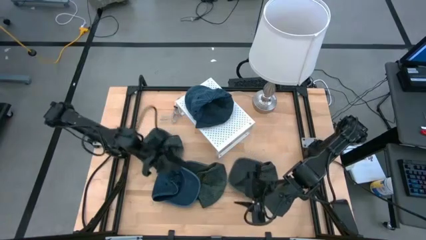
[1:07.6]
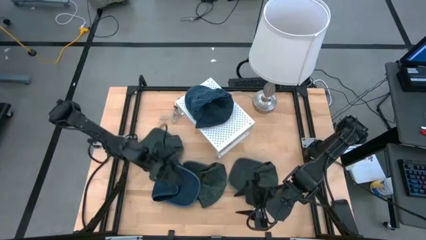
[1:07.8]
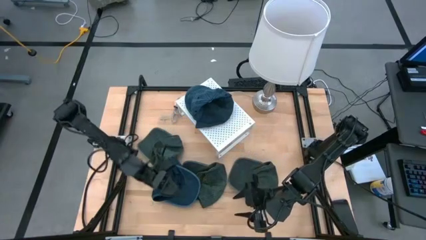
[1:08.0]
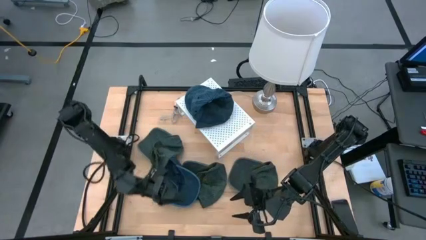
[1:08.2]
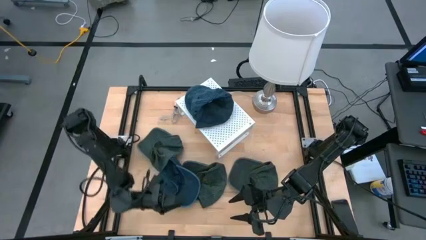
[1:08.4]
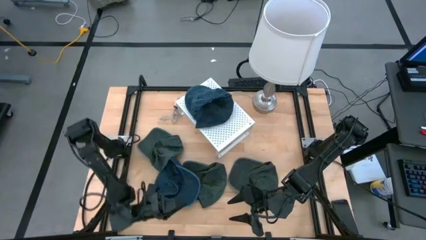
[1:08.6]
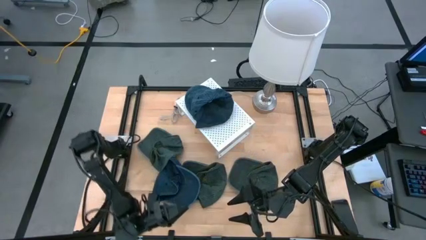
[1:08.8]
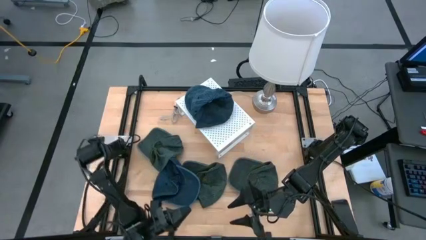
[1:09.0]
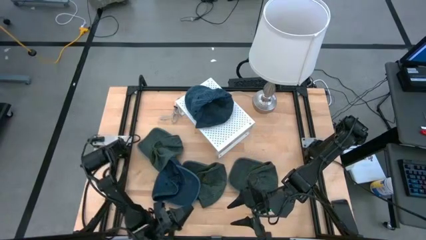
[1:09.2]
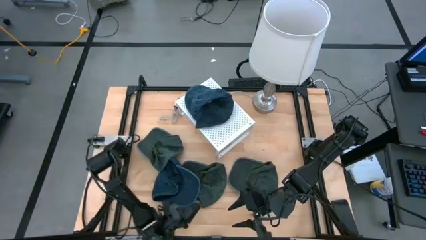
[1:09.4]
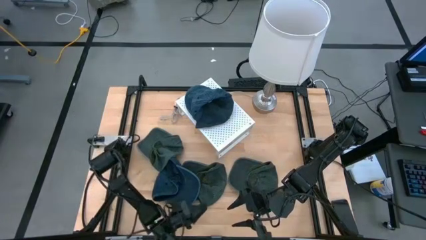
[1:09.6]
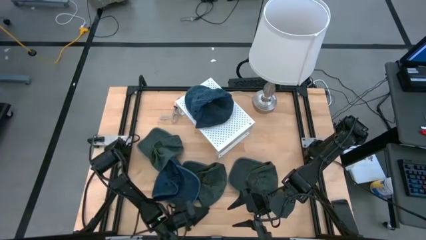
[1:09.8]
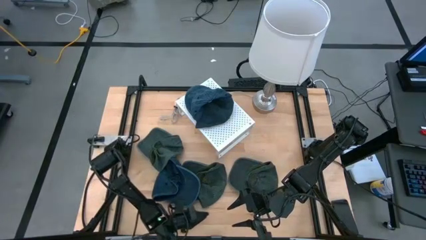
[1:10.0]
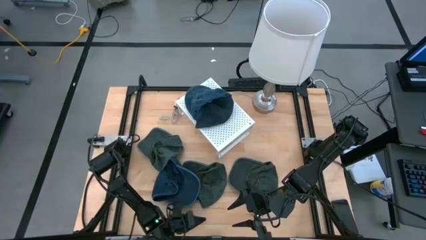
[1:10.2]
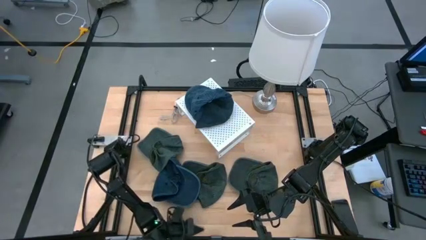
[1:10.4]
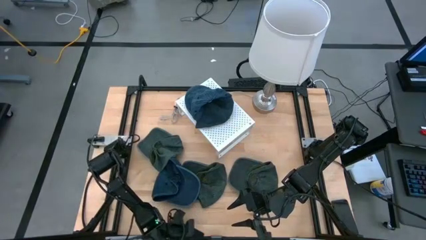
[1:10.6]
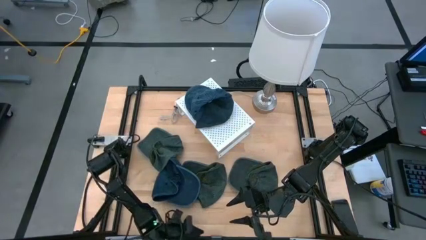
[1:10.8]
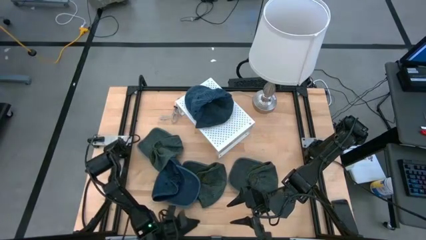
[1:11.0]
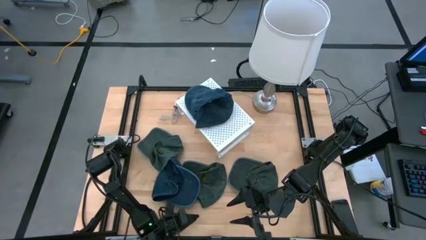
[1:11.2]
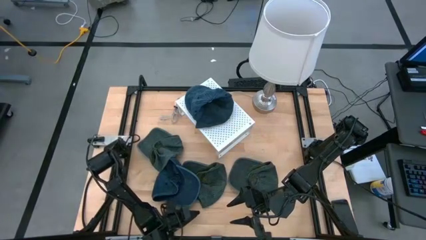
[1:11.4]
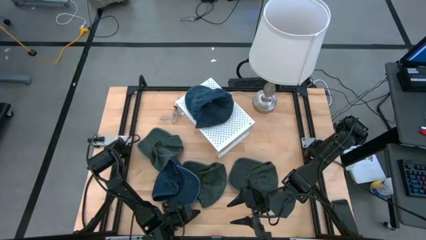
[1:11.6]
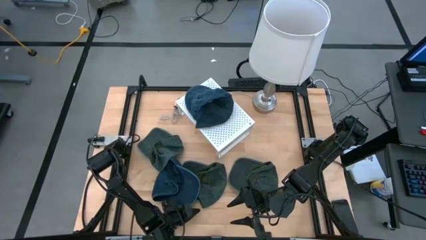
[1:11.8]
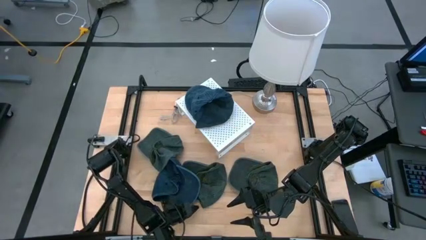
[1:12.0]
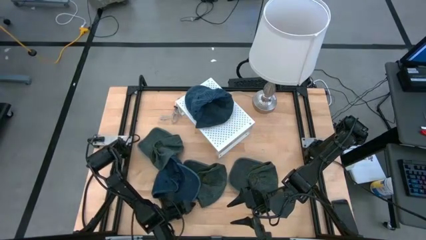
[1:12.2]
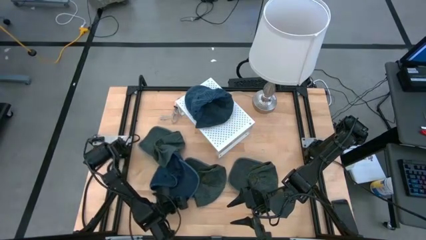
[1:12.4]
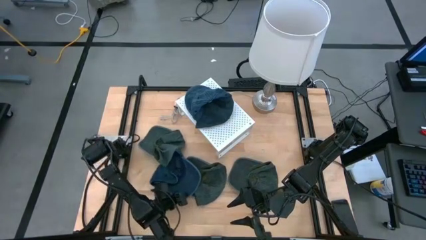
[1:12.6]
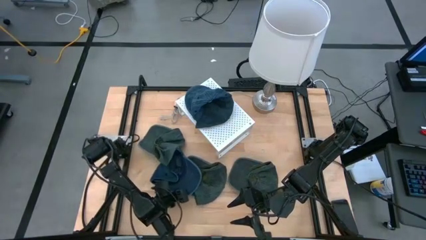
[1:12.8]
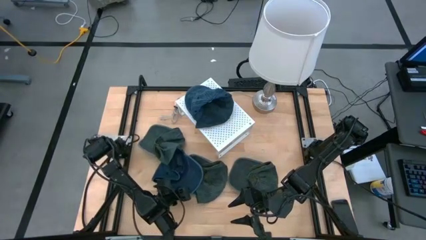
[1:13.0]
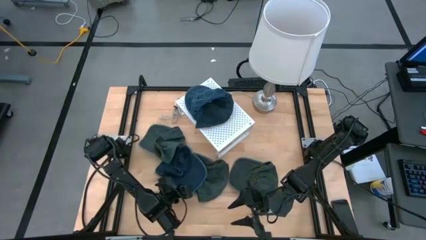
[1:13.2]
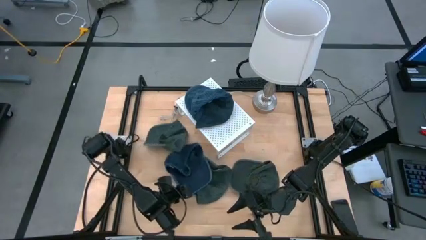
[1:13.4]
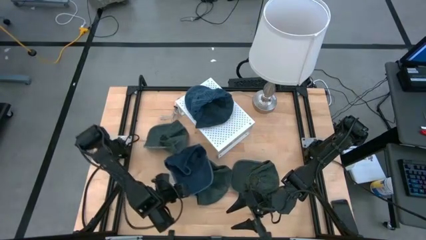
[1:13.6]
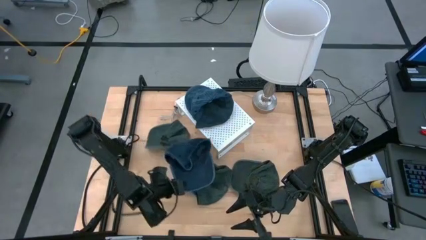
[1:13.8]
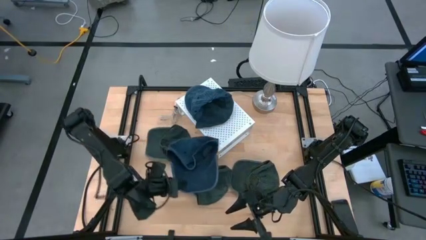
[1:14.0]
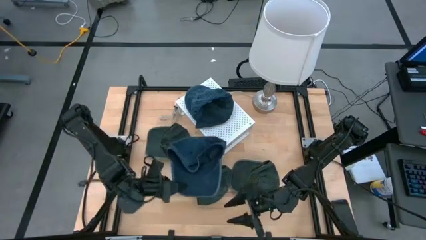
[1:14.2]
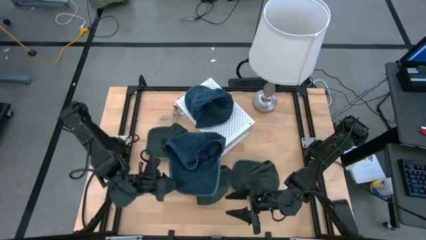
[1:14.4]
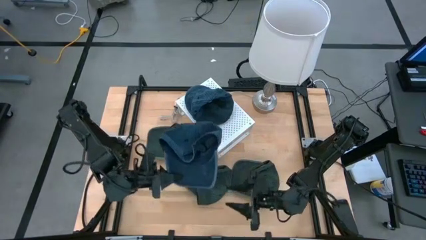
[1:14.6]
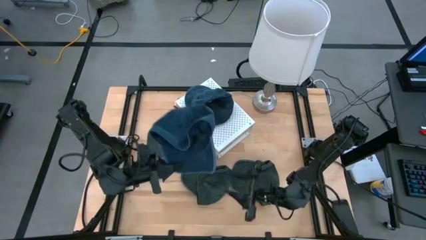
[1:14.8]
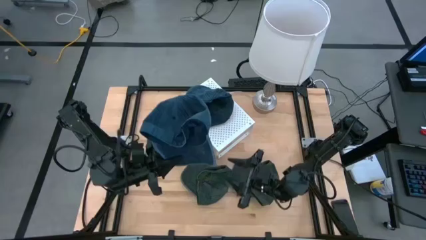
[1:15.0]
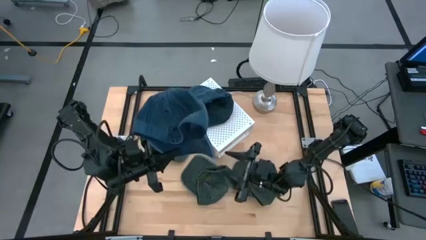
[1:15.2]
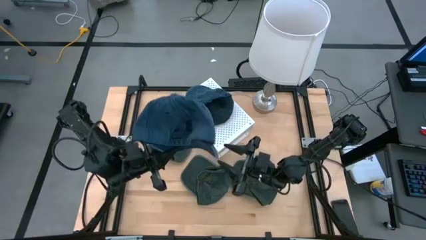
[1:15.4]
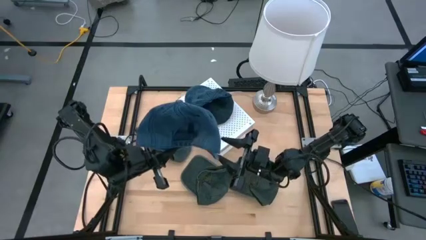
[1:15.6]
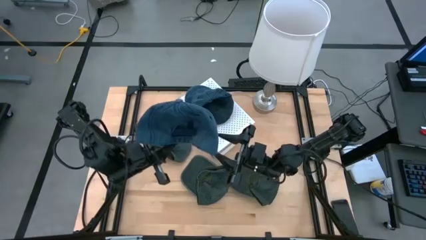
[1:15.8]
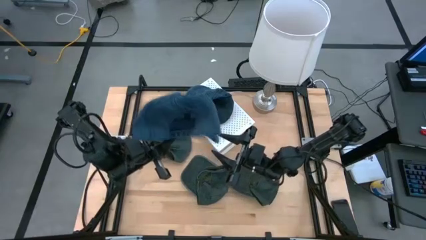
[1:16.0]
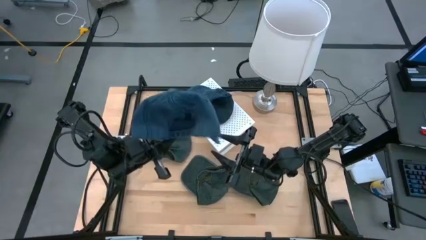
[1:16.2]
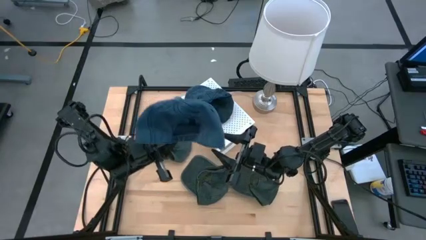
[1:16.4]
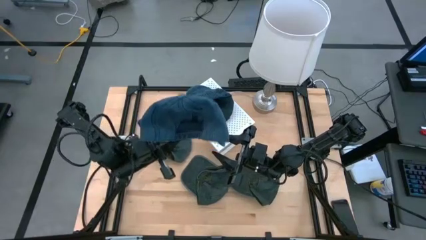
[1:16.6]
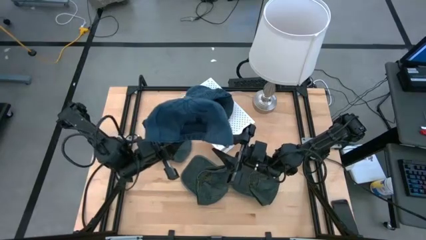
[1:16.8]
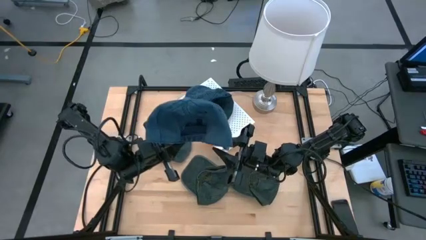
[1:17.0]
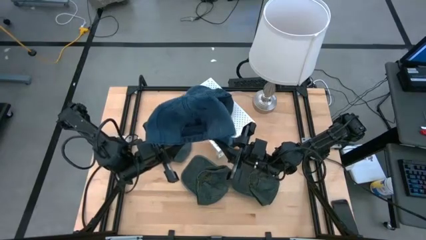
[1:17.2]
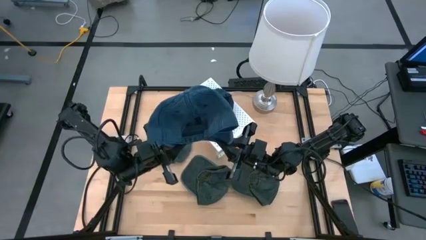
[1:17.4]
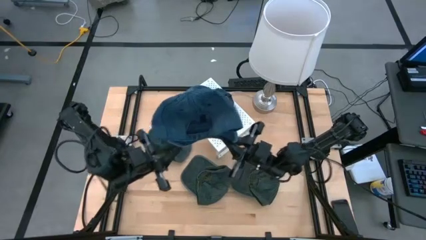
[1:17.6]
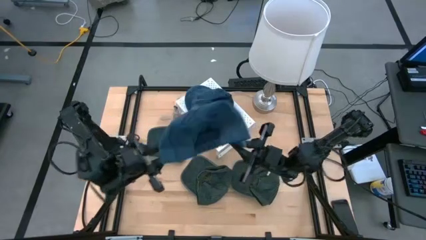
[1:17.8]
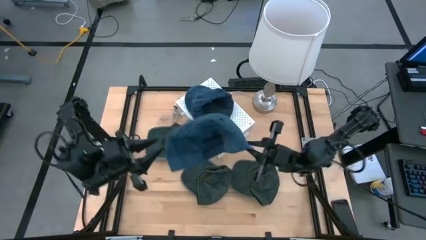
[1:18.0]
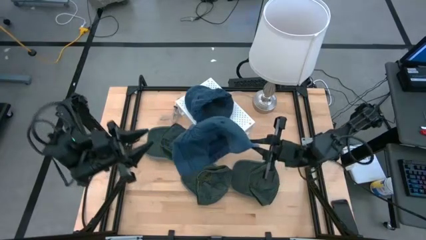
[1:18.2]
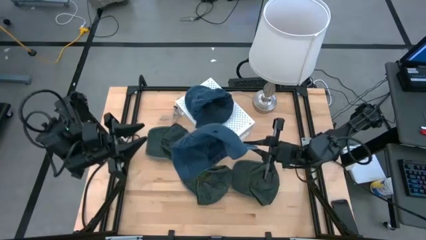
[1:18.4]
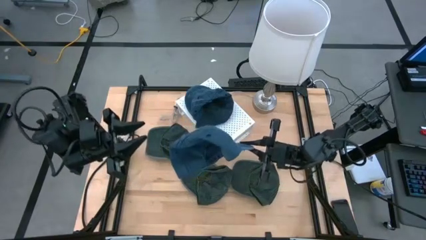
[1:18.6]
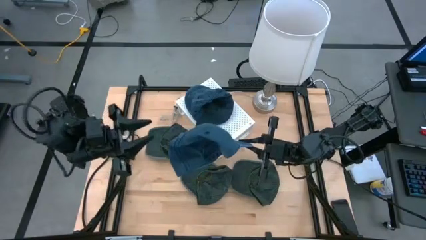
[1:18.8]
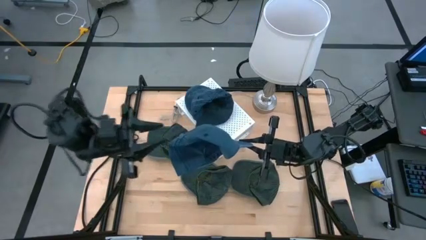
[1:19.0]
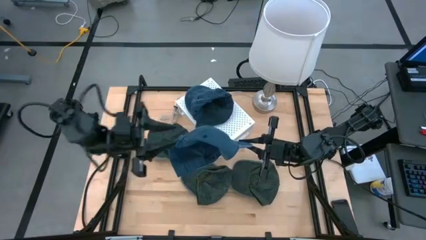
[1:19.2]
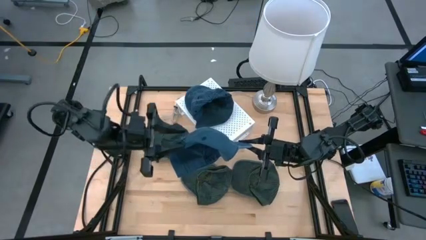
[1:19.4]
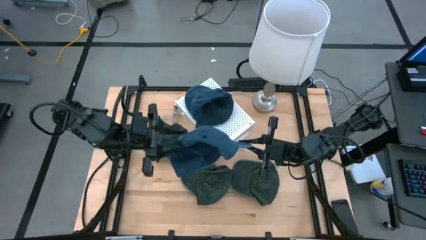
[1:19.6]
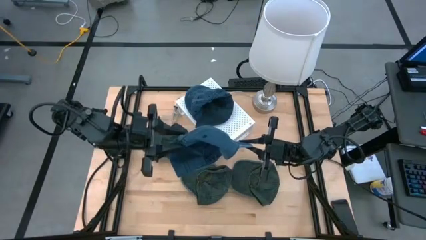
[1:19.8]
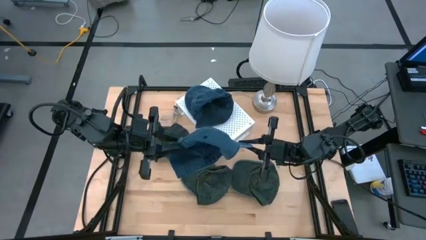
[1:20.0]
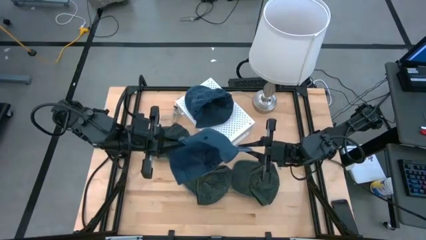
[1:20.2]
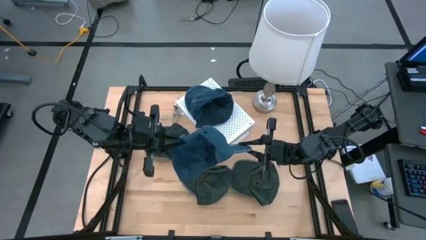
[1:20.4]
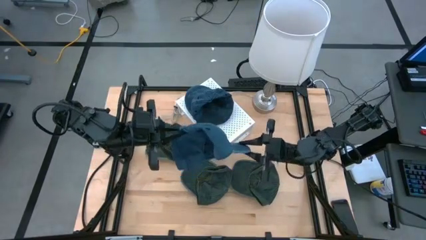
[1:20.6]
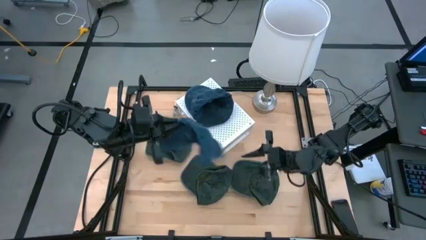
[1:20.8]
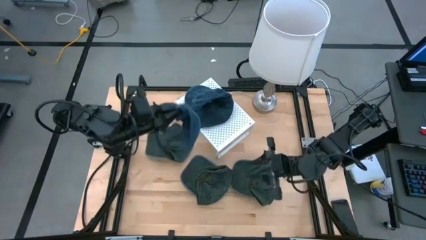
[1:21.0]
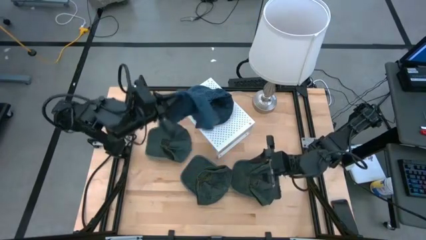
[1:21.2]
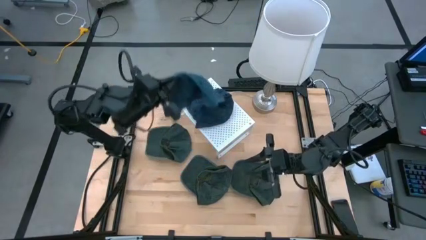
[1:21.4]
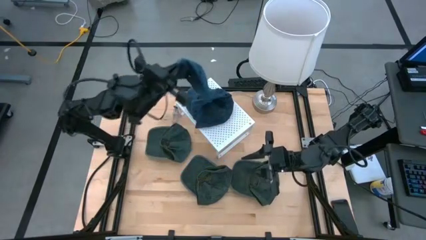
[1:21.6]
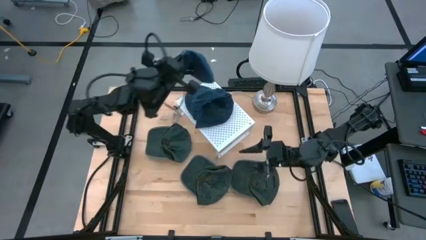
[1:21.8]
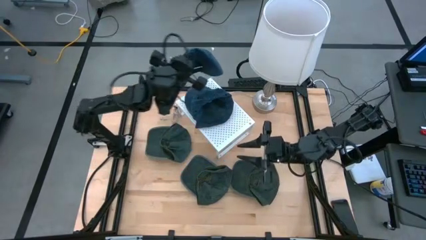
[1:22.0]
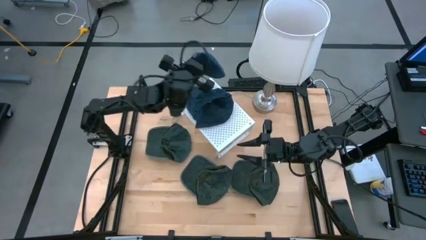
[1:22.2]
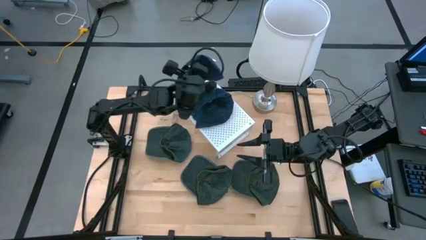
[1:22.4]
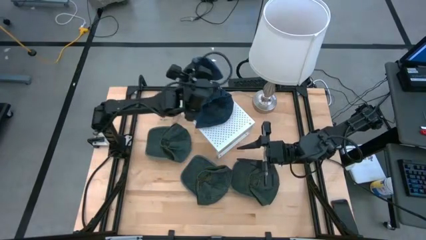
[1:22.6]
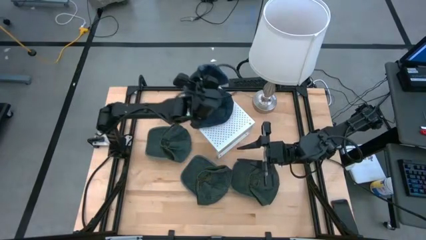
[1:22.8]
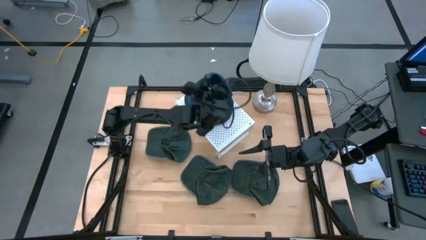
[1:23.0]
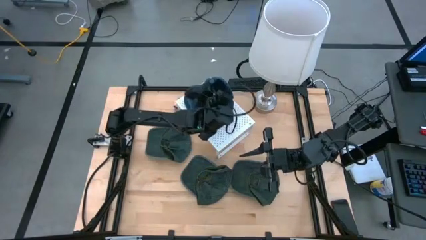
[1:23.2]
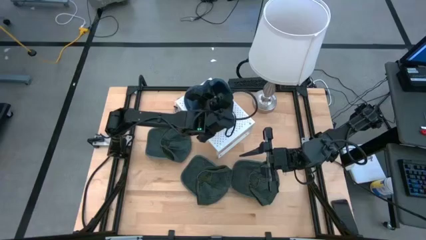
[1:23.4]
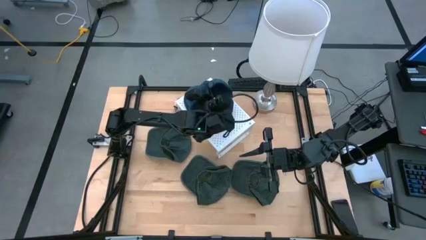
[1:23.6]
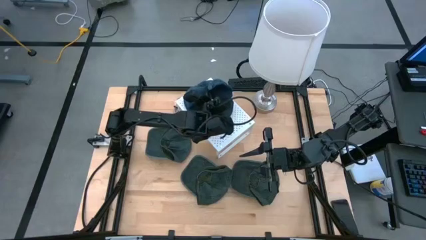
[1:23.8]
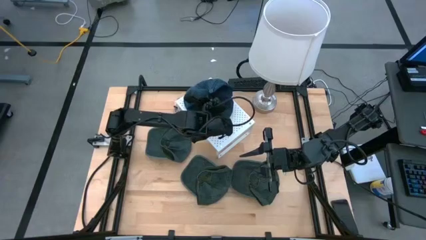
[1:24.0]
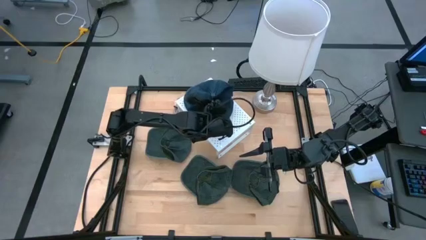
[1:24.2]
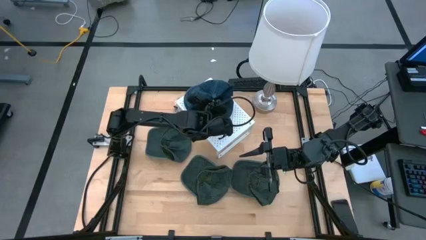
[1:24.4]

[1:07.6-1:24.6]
Task: Pick & Place hat
Stack the blue cap on the blue cap on the shelf
